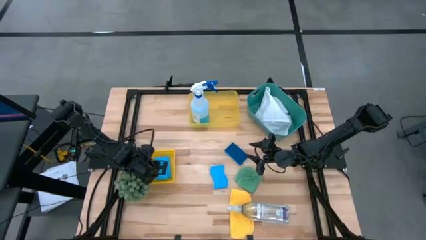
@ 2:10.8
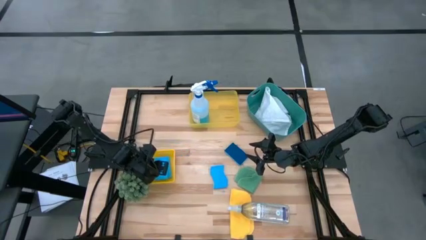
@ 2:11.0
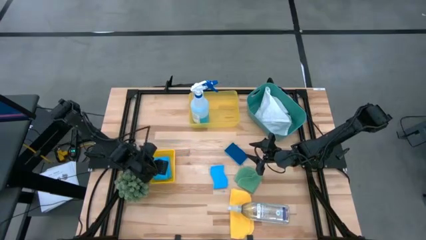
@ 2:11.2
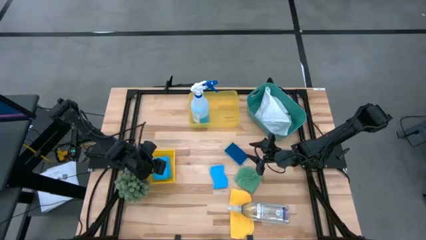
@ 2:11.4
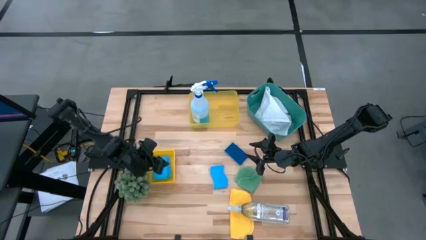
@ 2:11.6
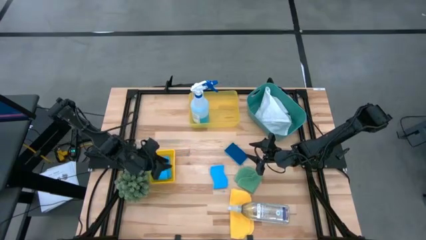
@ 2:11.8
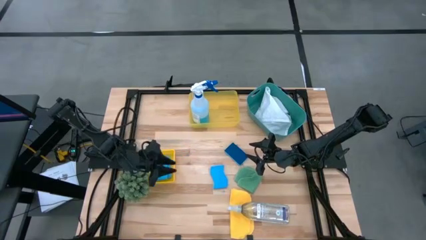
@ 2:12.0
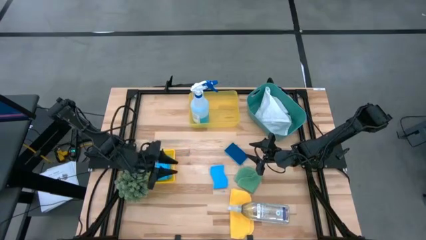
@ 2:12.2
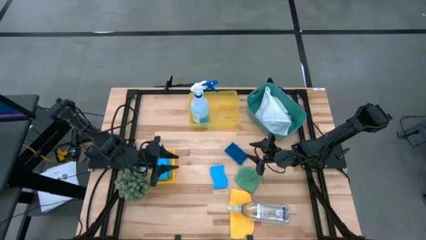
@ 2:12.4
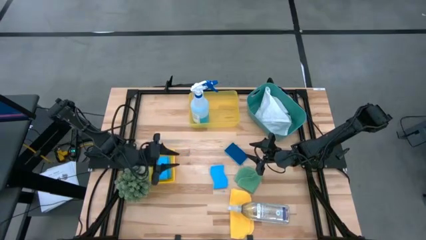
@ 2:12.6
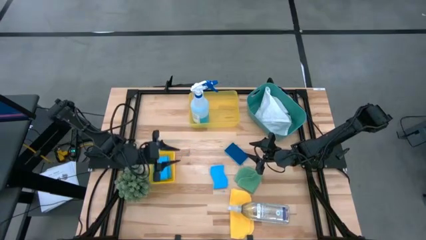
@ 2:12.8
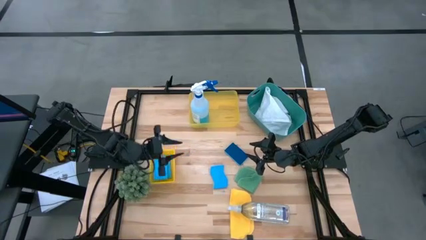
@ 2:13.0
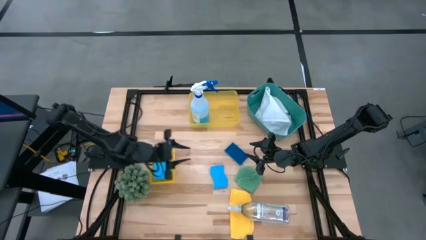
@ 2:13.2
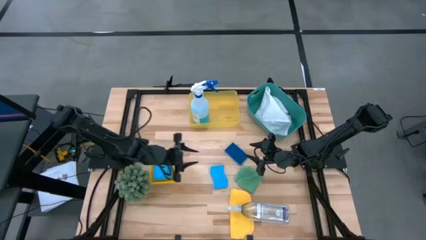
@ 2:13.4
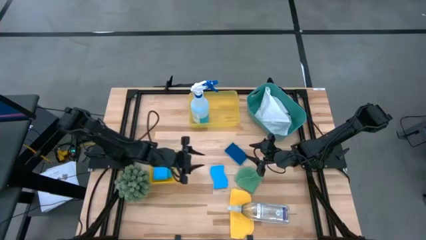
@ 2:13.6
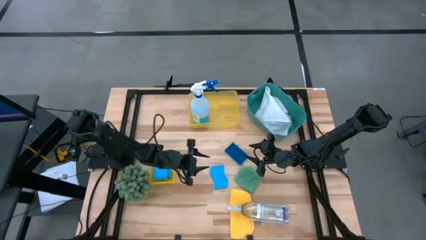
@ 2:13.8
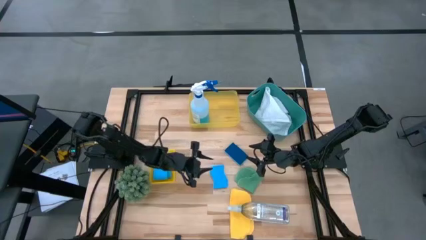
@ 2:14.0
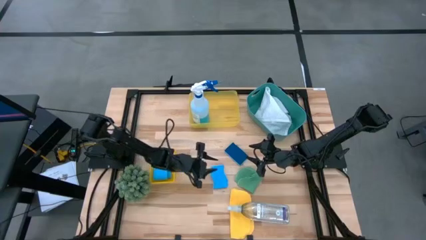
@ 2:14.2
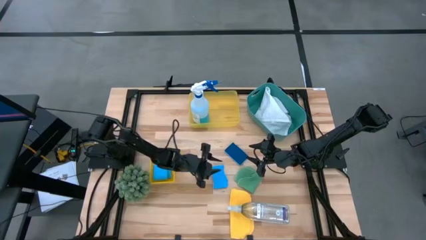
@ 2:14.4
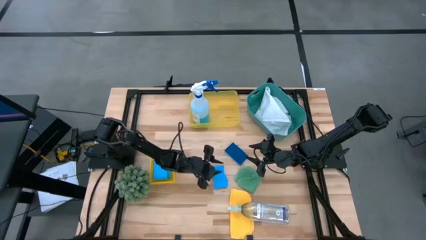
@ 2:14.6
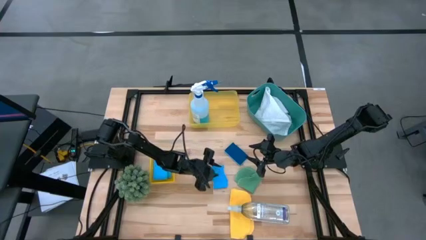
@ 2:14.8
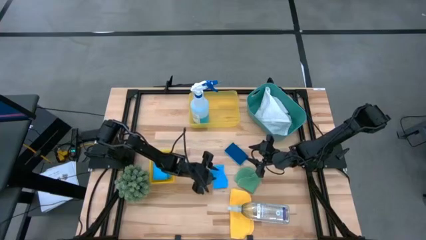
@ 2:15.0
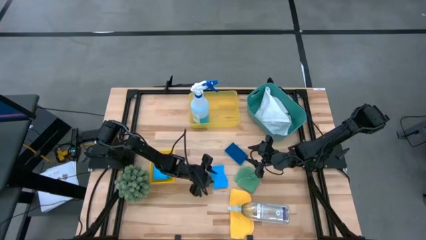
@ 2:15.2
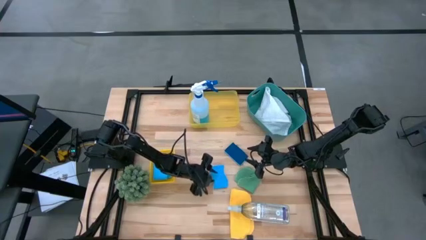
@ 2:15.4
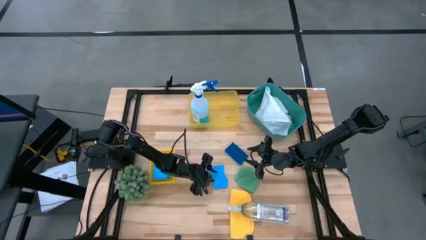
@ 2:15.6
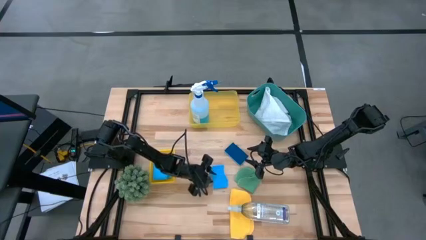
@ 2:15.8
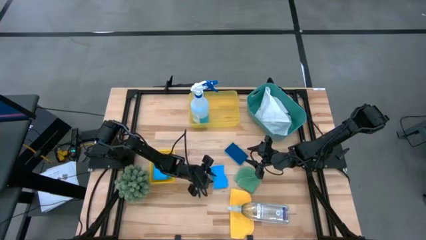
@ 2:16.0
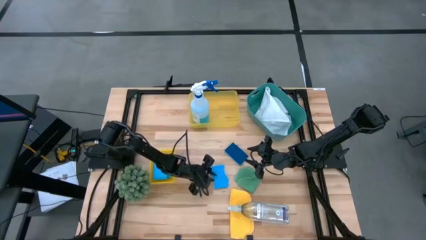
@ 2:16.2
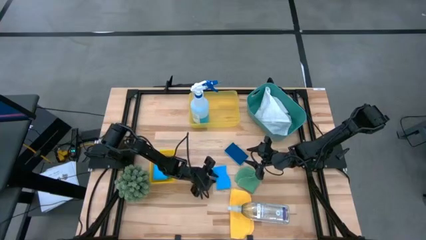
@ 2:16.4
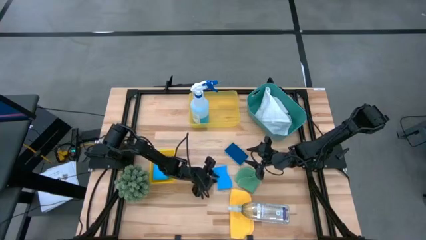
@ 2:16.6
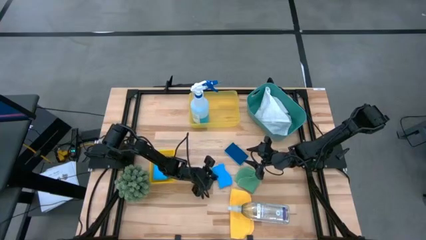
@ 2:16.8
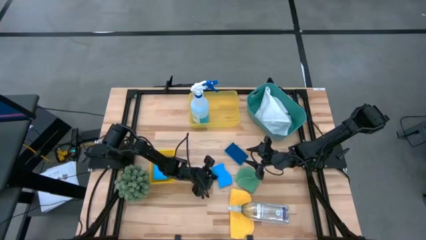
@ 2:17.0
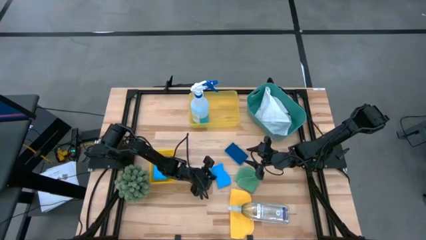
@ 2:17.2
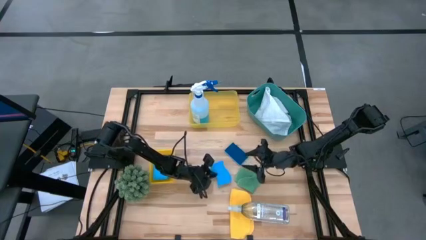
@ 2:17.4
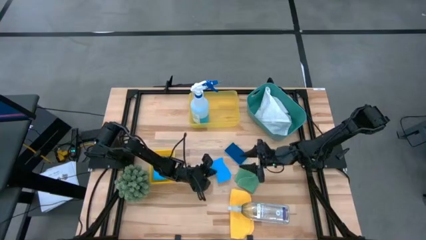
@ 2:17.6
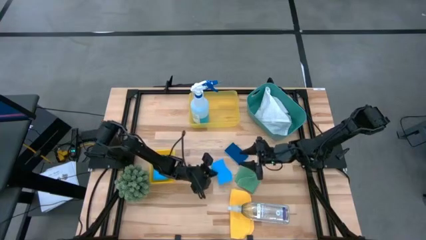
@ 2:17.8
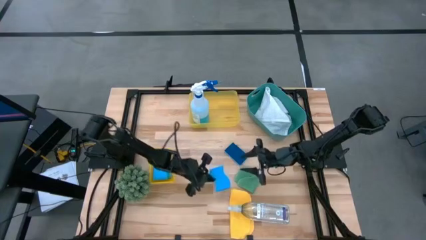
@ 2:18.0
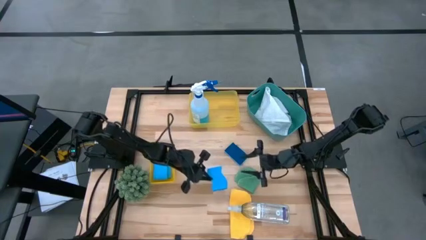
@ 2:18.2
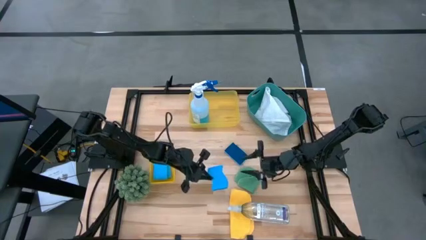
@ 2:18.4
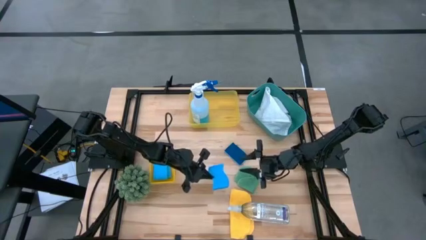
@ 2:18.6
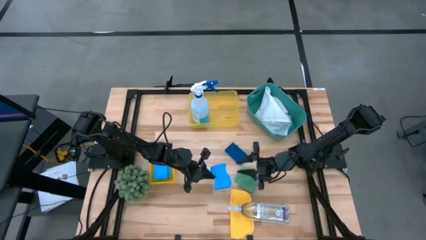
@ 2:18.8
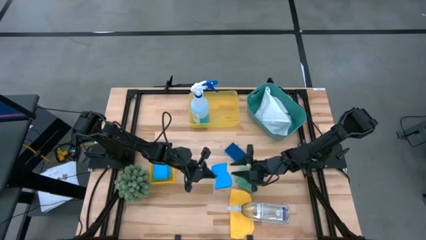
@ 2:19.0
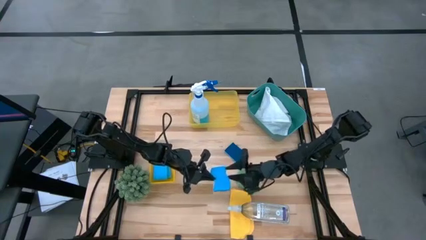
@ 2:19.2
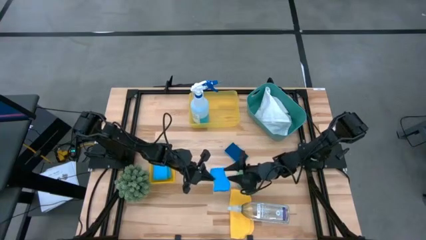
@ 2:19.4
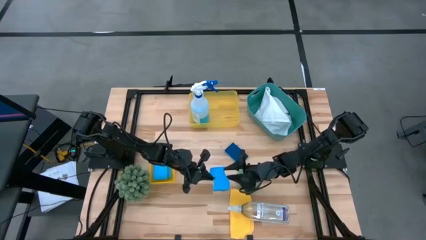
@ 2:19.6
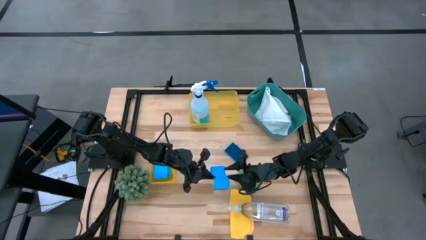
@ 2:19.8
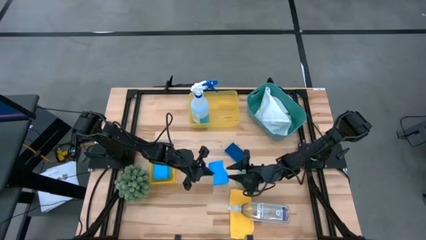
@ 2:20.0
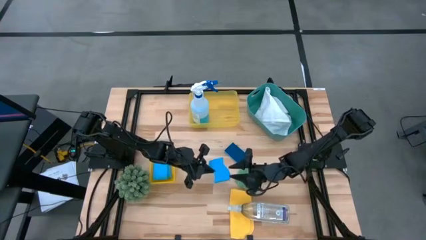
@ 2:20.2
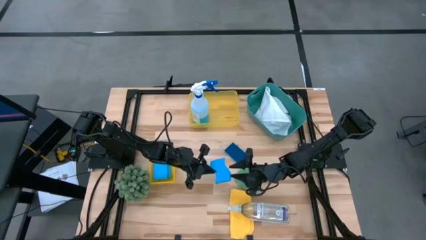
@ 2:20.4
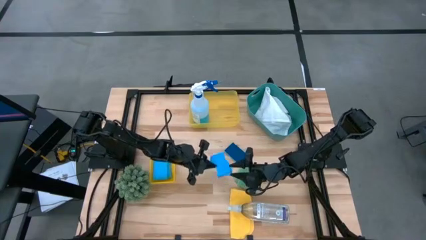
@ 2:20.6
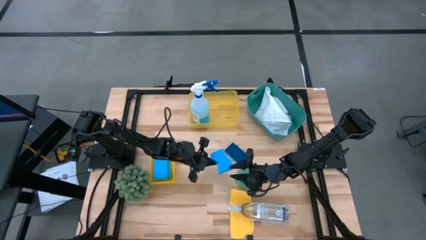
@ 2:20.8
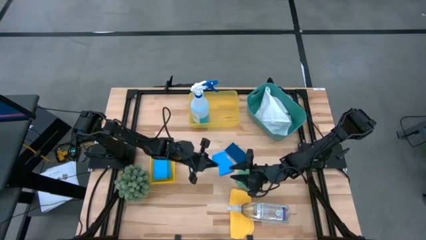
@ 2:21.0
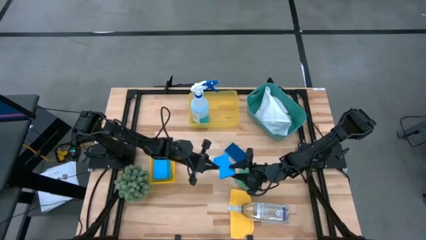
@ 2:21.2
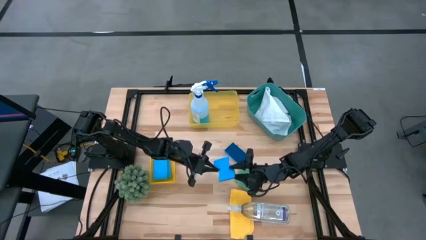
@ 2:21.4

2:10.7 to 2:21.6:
Task: Pick & Place Kitchen Items
Put the blue sponge into the bottom yellow bin

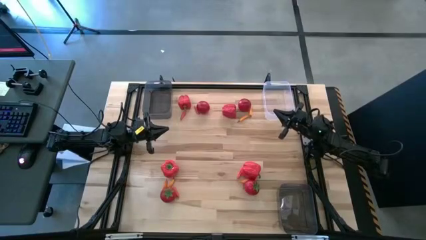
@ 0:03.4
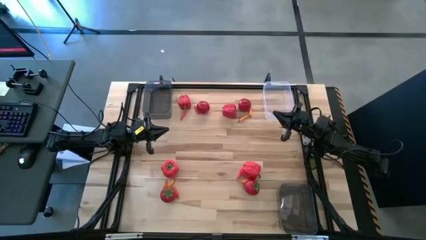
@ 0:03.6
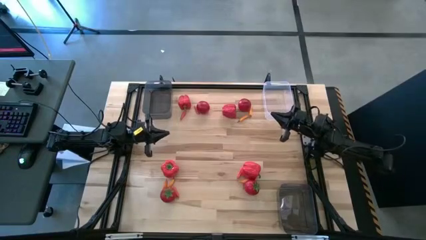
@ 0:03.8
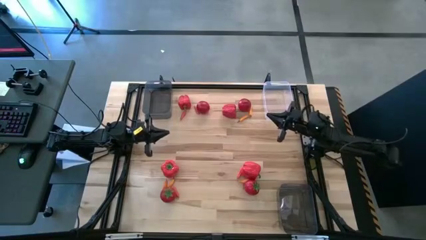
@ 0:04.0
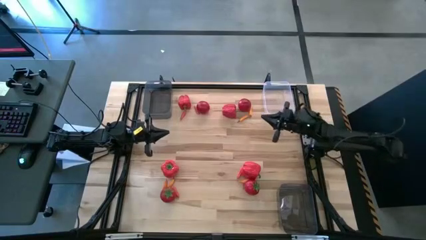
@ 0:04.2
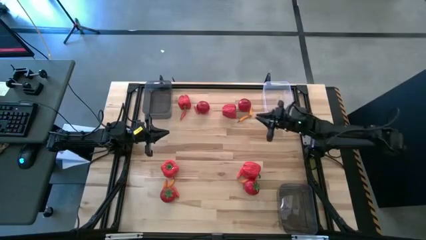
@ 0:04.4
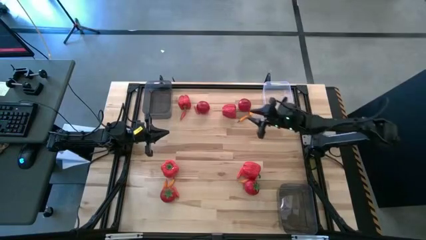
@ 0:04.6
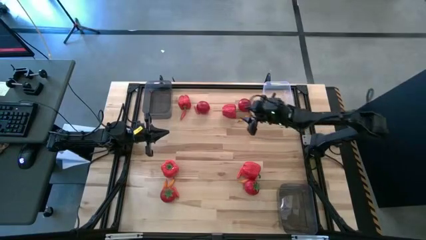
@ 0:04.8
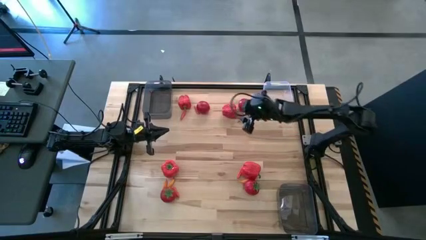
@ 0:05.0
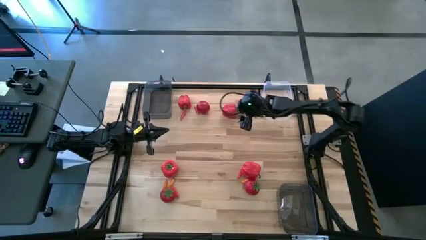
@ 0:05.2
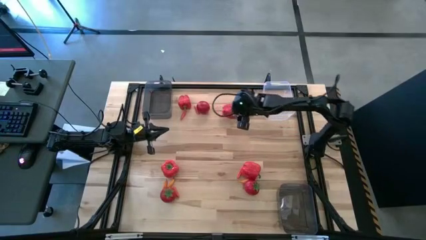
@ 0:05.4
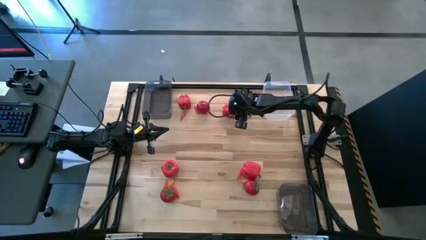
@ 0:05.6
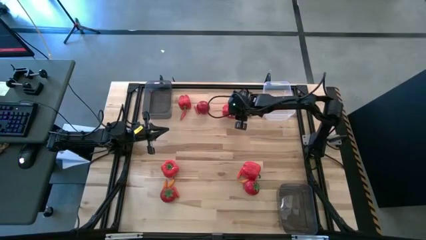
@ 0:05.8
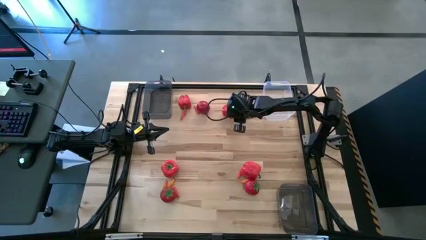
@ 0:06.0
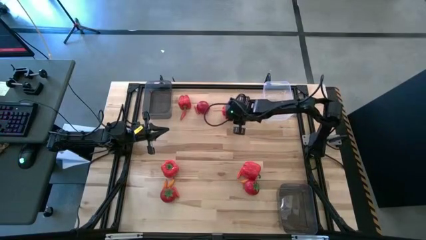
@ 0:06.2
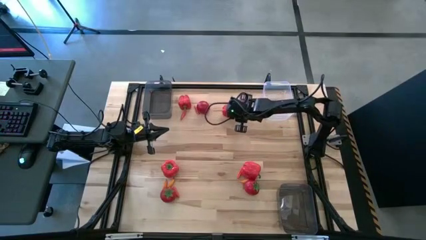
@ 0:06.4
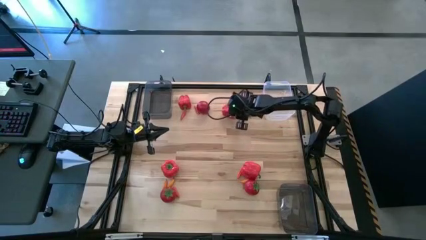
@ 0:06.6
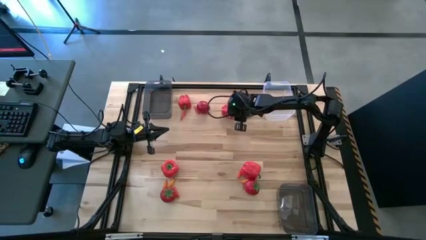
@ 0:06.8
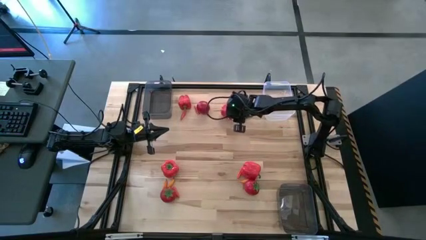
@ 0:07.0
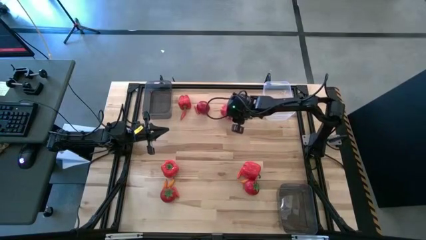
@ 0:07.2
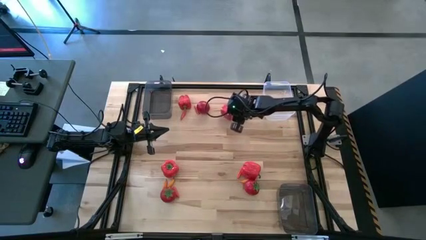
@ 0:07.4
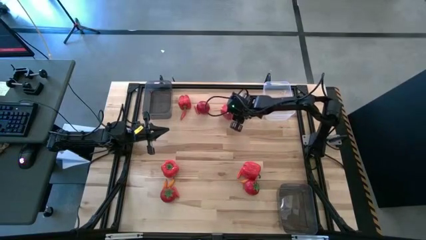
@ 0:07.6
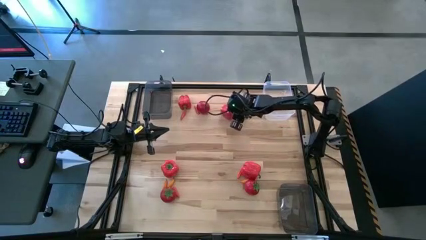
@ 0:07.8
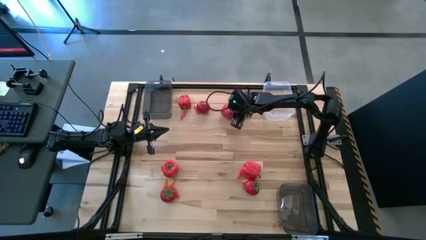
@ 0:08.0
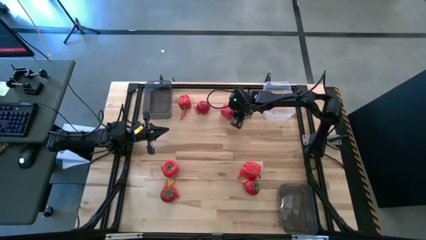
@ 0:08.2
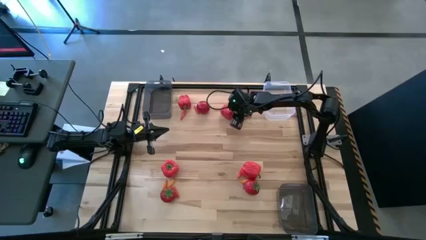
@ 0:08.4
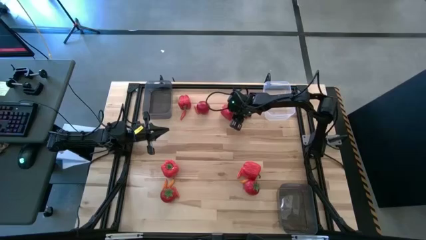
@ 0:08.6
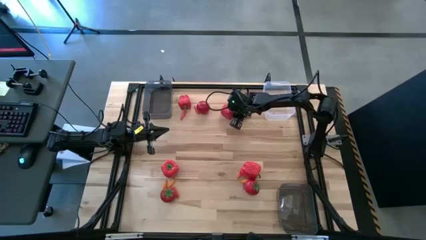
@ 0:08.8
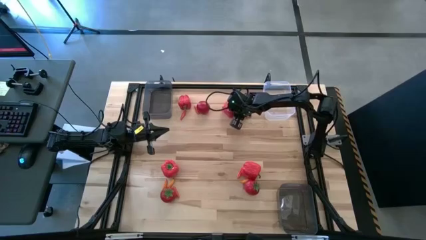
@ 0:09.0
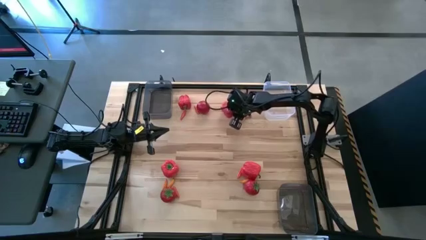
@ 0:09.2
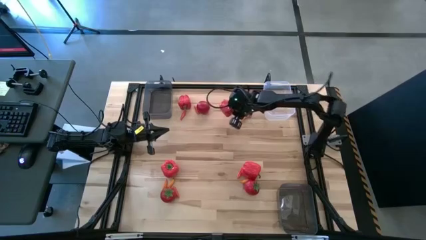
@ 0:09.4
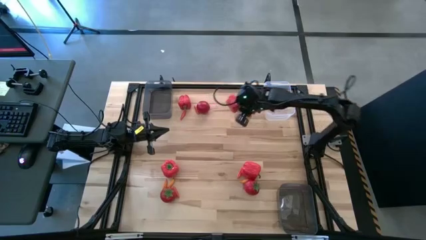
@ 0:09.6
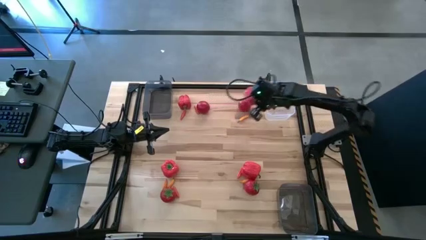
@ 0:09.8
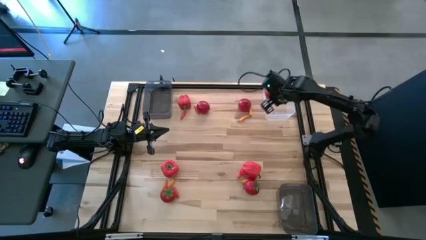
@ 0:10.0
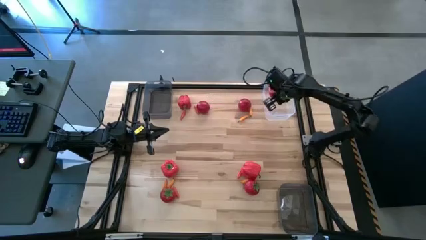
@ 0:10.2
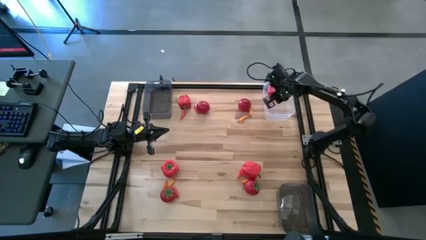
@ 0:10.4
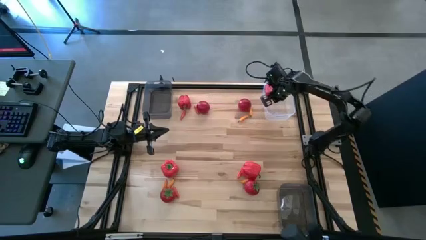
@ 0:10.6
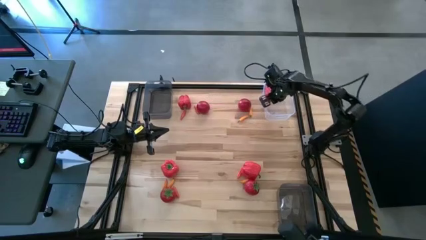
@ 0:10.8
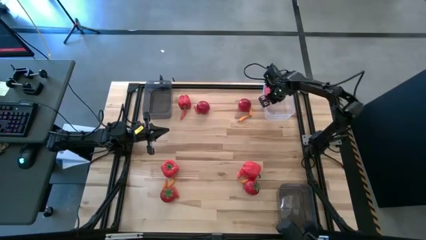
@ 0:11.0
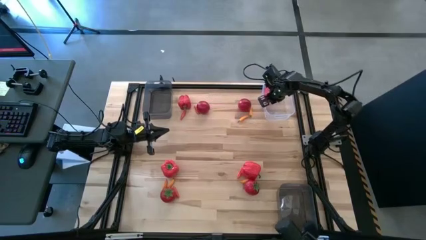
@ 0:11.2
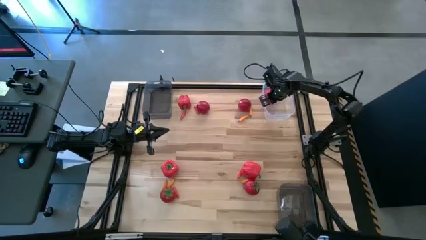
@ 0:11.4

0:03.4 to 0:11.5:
Task: Sort produce into baskets
Put the red bell pepper into the transparent bin
